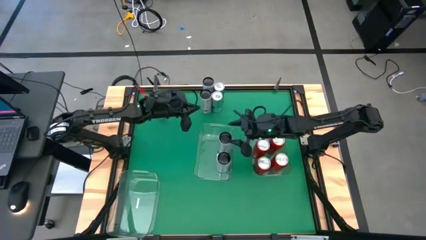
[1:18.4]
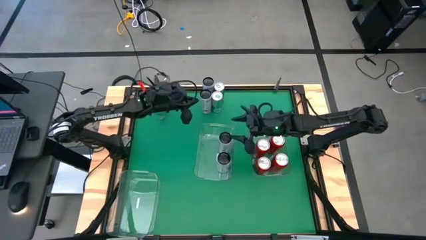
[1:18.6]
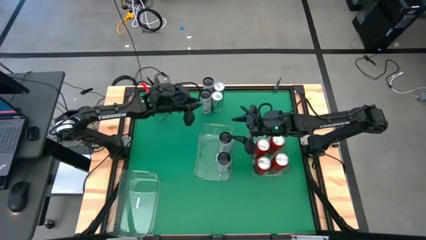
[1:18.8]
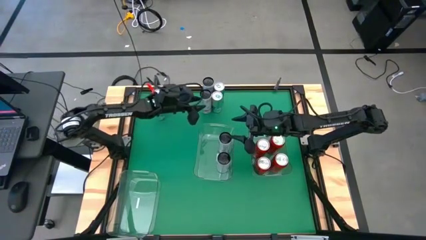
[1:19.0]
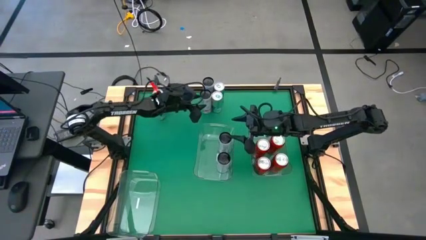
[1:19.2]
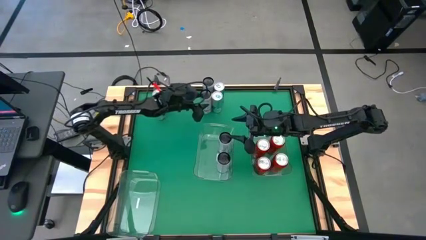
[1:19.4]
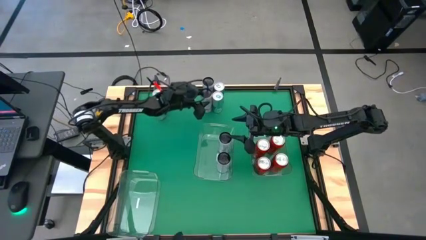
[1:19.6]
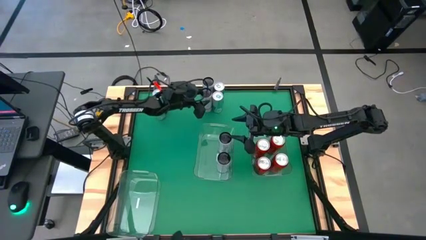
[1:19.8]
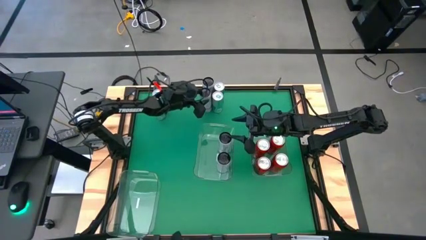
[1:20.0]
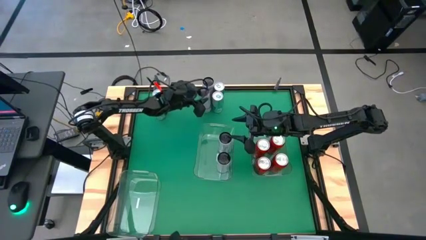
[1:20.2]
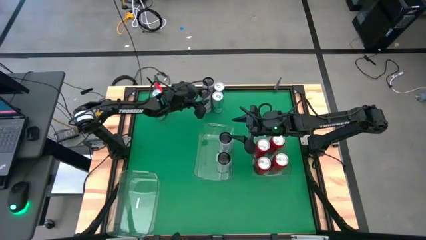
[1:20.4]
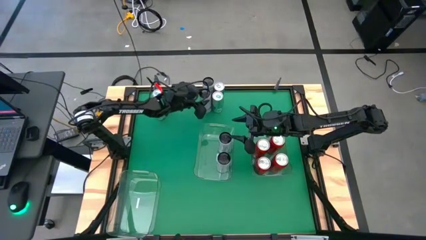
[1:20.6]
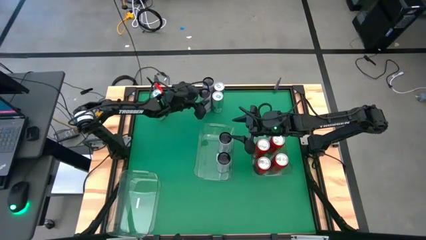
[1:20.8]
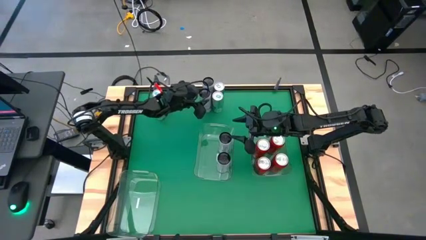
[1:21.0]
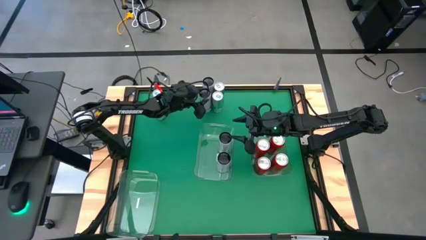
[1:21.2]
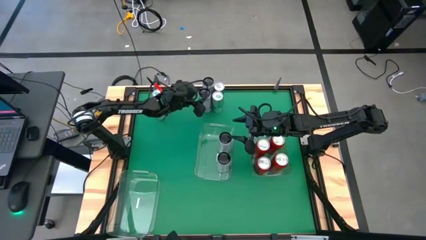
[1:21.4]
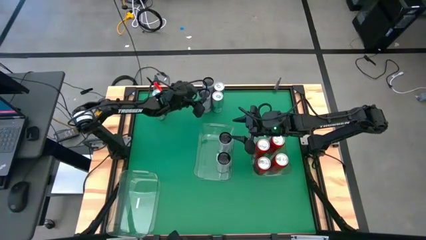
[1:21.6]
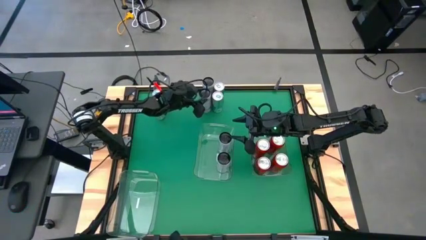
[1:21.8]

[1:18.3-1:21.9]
Task: Sort soda cans
Put the bottom white-pink soda can into the top left transparent bin

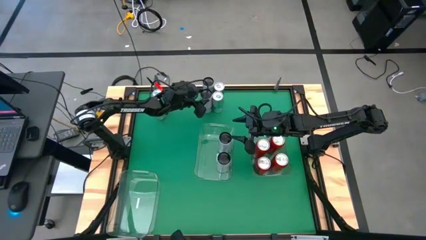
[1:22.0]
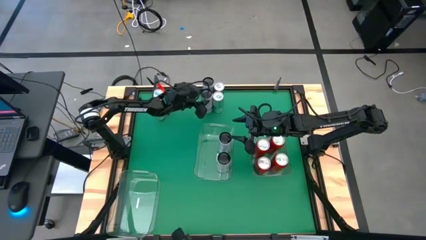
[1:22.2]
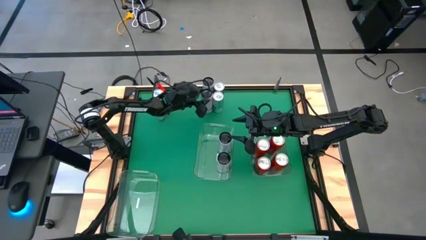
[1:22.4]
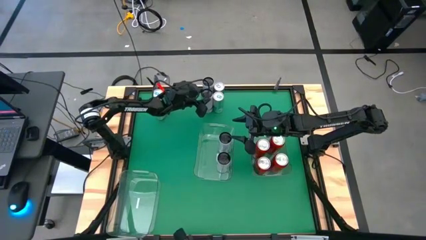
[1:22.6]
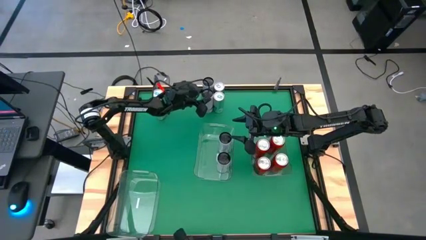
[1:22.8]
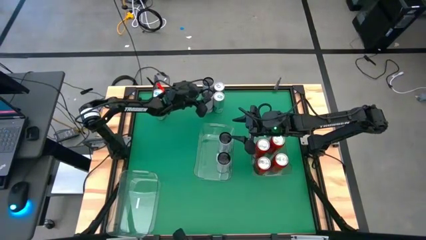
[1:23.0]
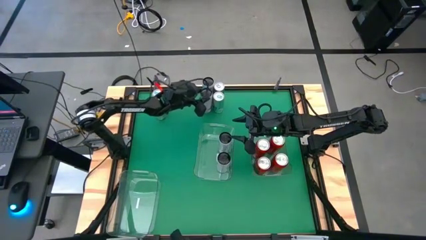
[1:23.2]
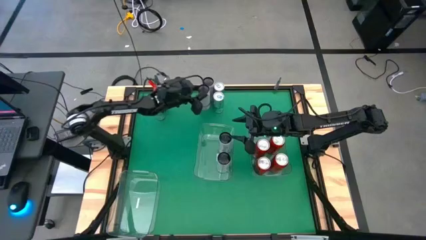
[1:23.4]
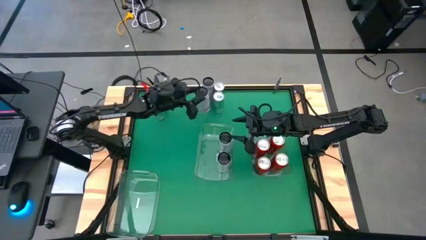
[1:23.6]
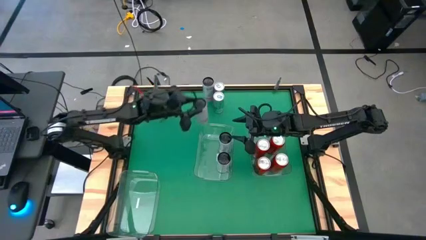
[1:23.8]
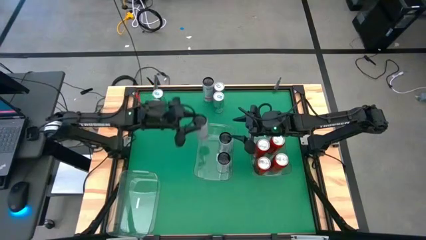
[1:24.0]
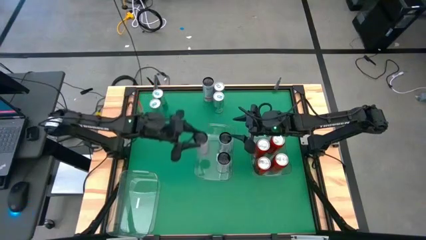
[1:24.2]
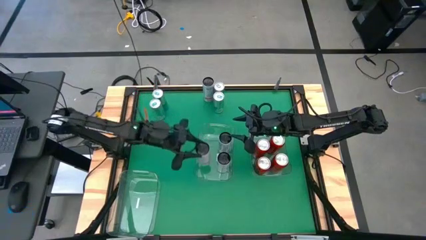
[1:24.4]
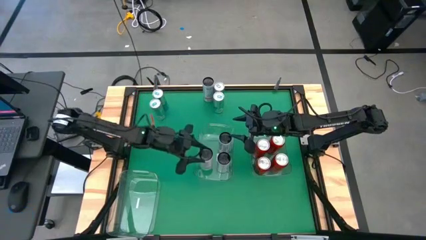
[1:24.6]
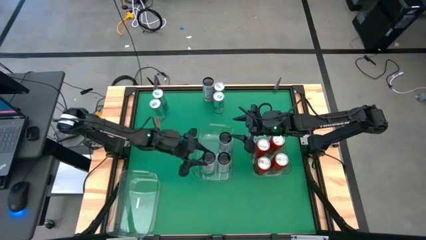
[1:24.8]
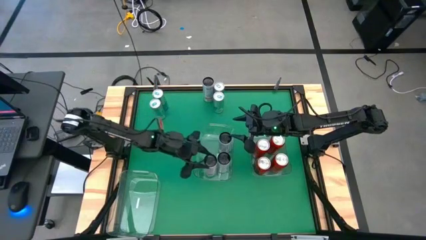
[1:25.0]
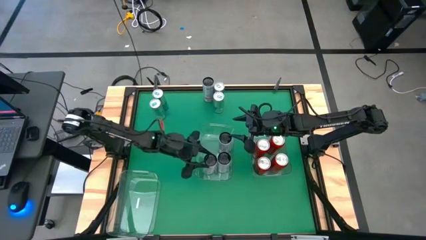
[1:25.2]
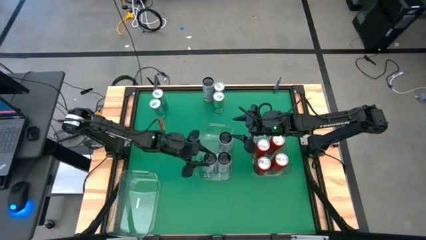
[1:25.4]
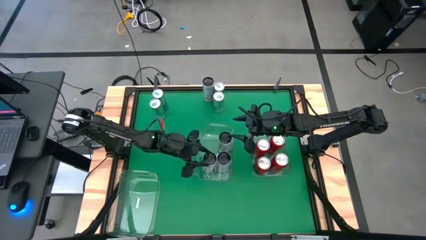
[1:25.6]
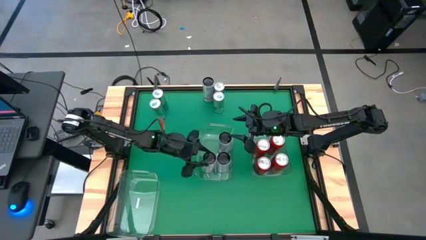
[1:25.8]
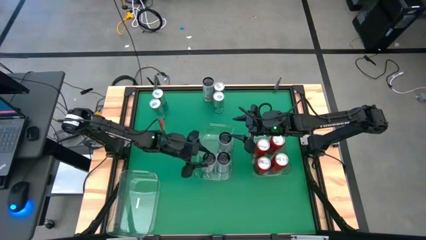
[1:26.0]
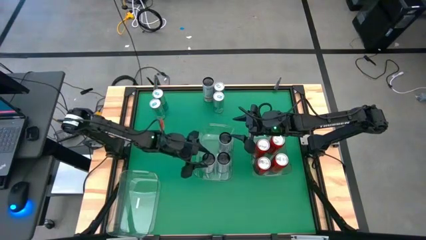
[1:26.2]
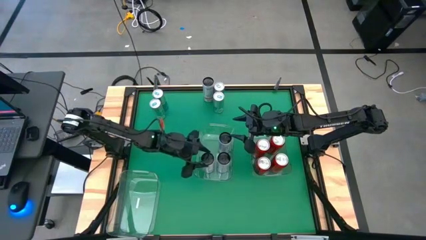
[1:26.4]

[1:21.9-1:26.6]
Put the bottom white-pink soda can into the top left transparent bin

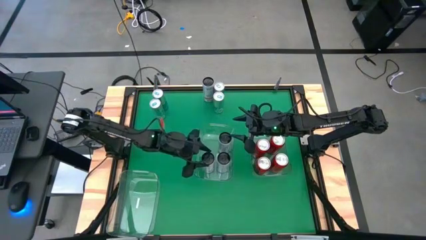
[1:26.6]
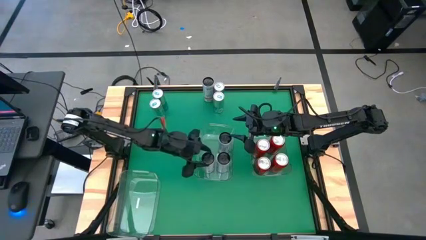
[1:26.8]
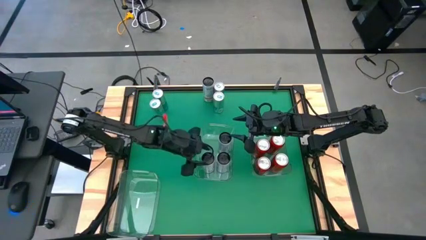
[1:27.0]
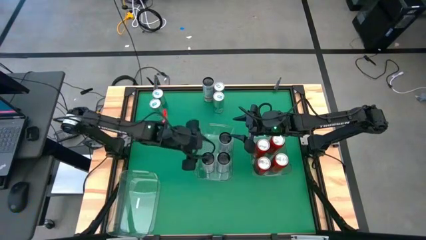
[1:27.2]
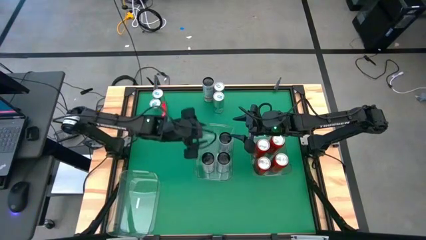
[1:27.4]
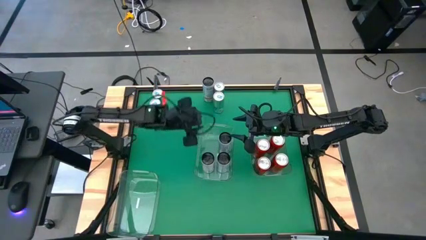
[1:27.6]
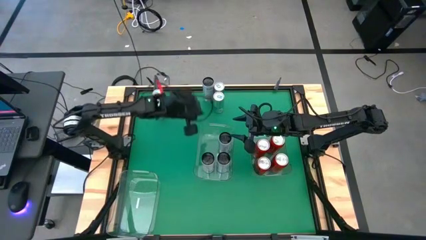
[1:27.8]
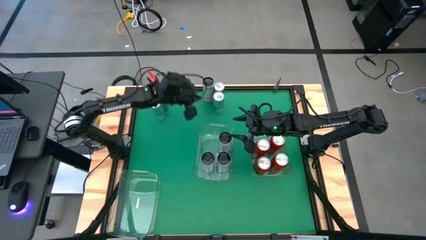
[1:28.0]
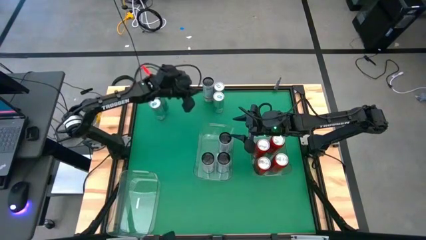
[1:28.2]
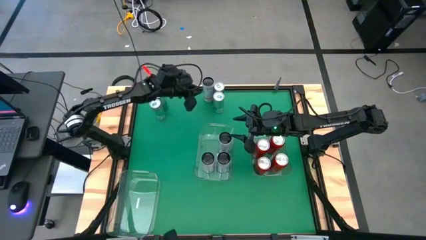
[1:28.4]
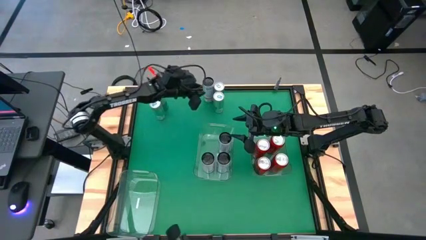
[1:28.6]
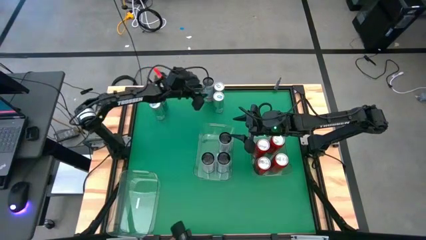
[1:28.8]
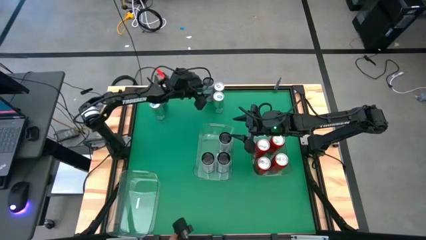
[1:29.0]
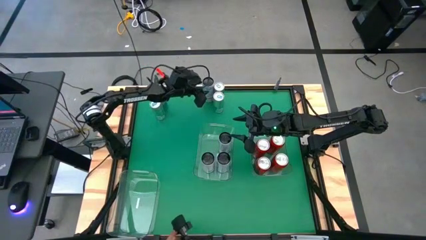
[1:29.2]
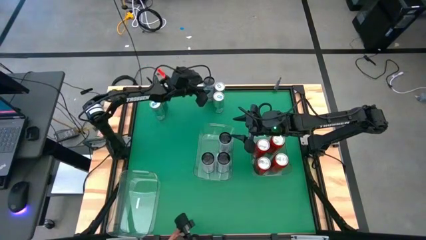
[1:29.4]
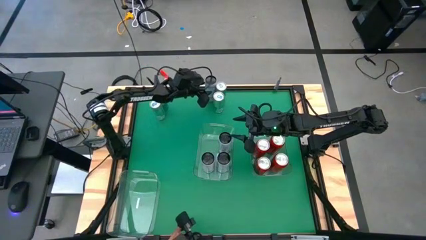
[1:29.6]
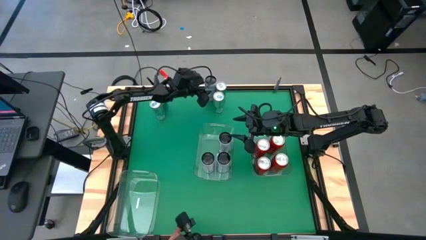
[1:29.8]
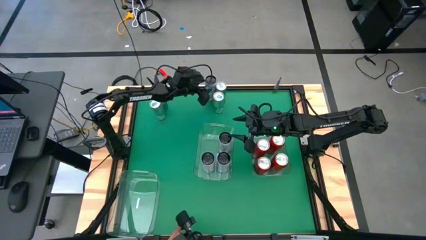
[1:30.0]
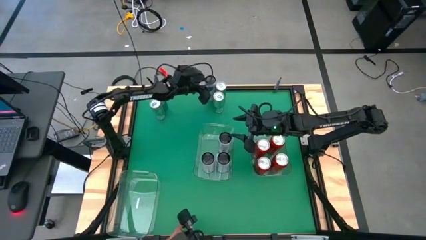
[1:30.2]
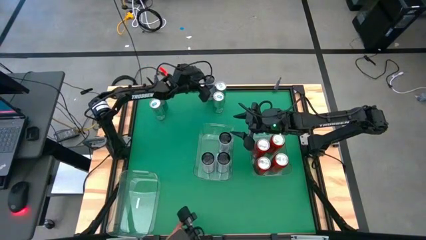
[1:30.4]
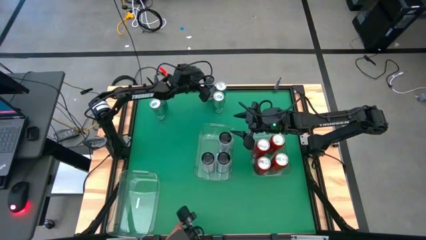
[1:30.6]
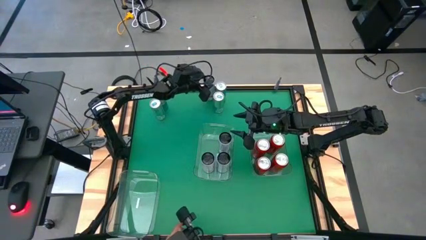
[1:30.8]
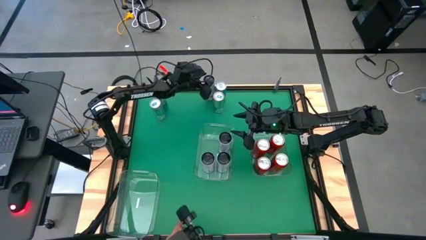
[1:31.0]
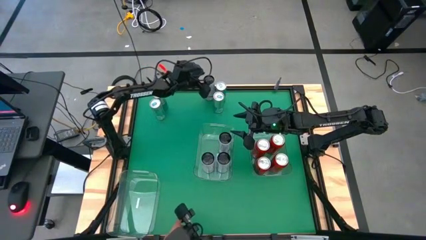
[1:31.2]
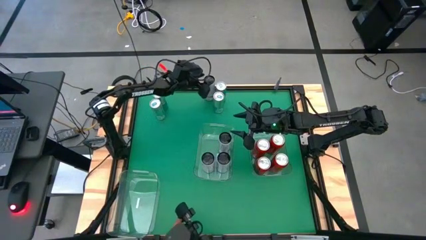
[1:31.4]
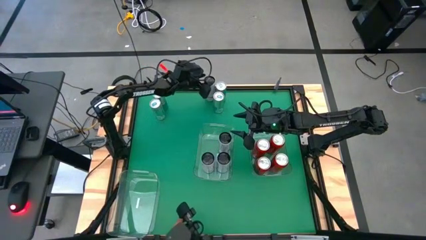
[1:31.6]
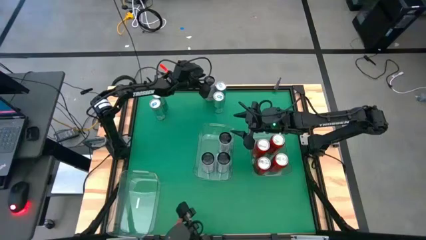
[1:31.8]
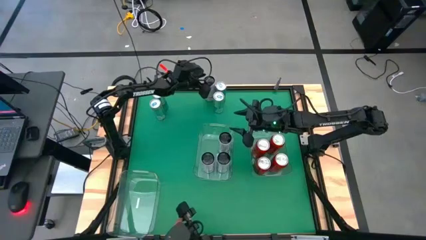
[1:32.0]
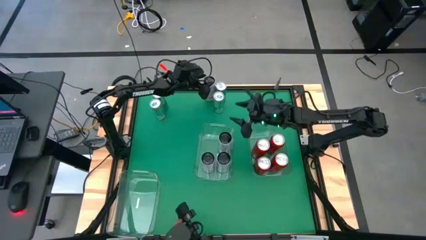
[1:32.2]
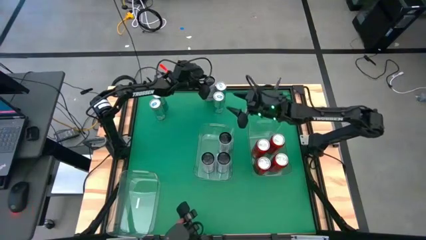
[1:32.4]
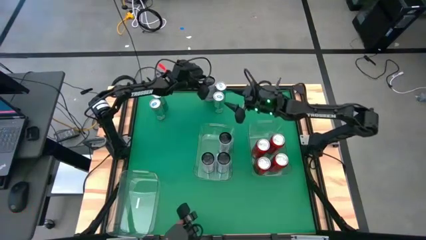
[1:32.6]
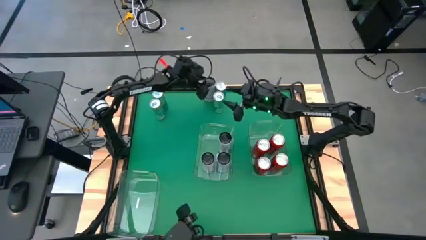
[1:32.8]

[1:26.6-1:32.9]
Put the white-pink soda can into the top left transparent bin
